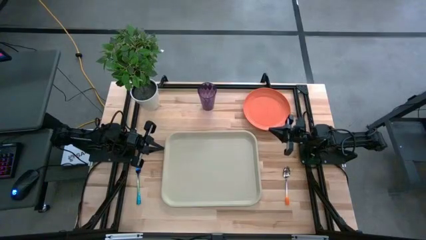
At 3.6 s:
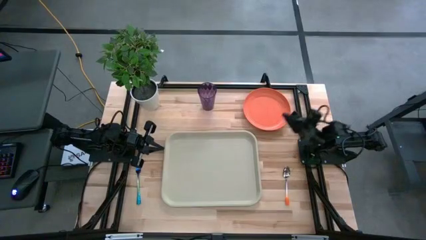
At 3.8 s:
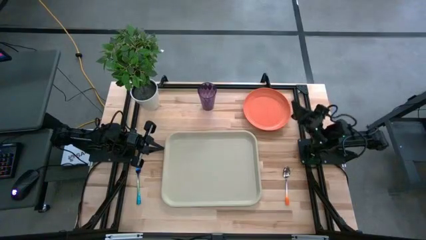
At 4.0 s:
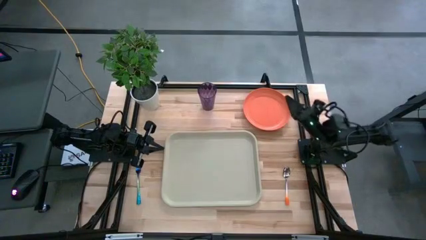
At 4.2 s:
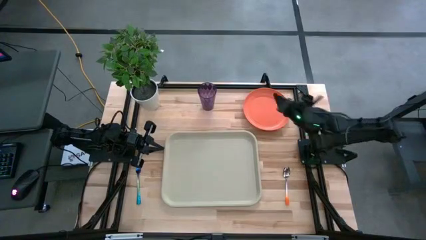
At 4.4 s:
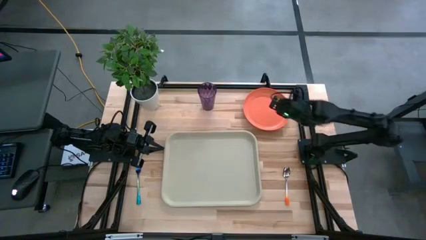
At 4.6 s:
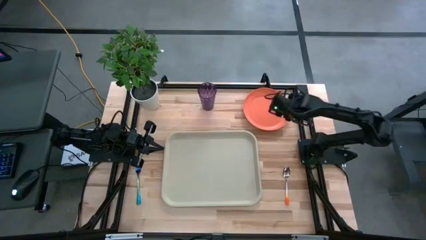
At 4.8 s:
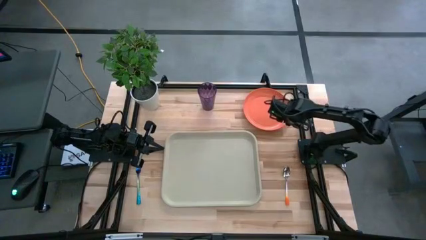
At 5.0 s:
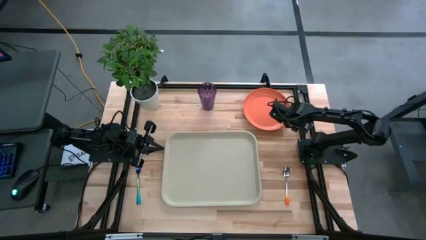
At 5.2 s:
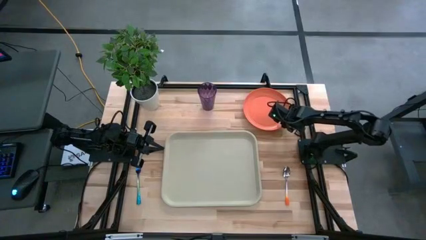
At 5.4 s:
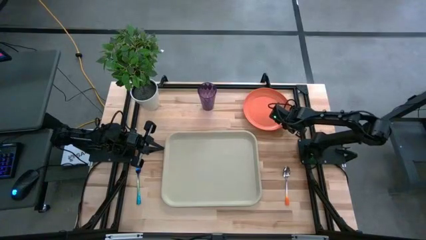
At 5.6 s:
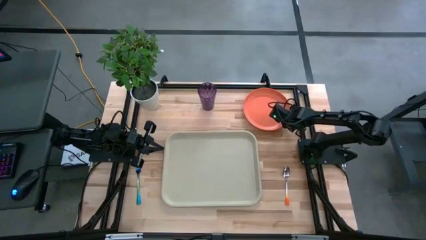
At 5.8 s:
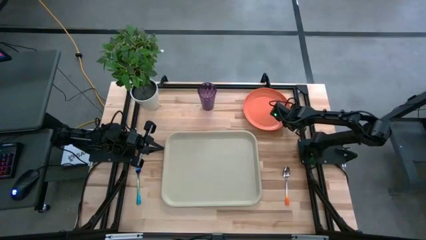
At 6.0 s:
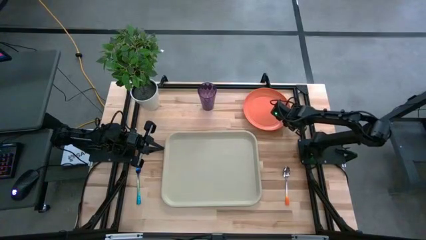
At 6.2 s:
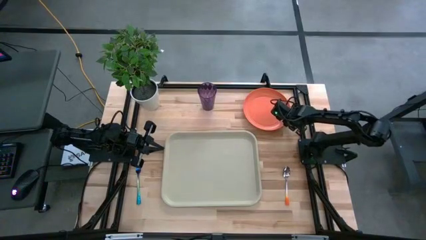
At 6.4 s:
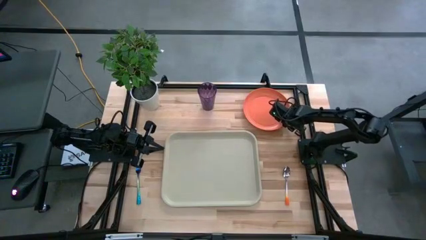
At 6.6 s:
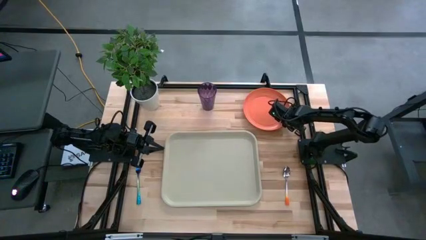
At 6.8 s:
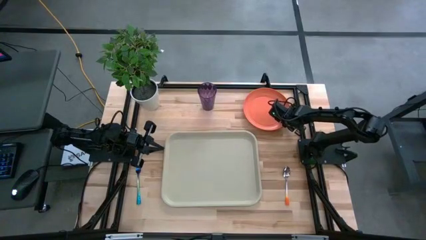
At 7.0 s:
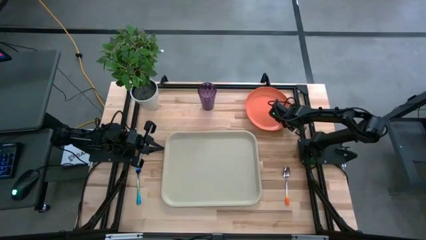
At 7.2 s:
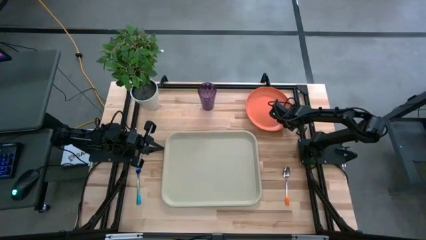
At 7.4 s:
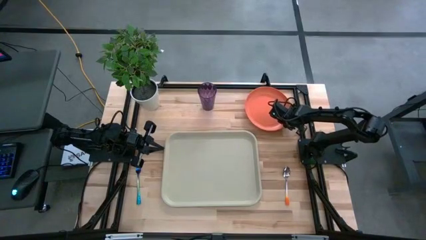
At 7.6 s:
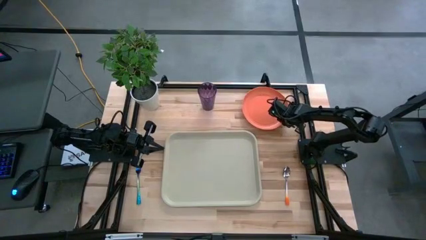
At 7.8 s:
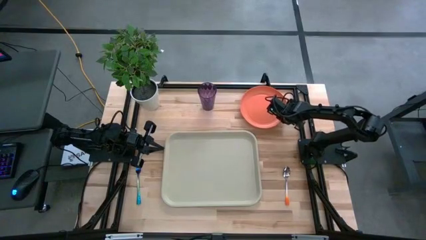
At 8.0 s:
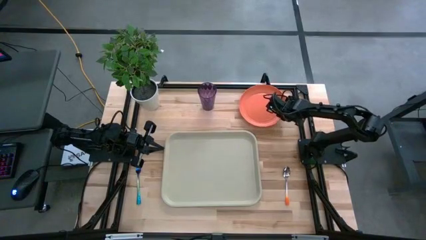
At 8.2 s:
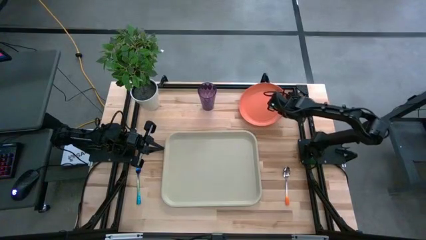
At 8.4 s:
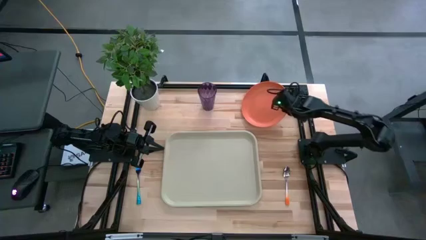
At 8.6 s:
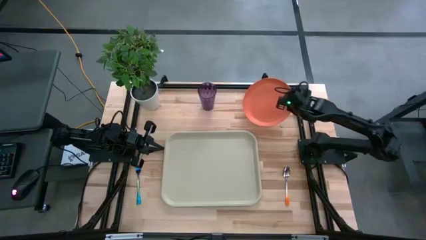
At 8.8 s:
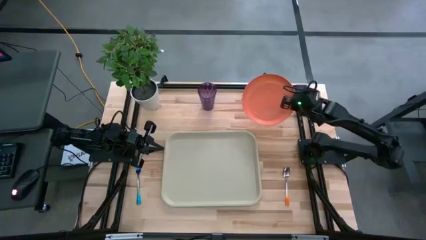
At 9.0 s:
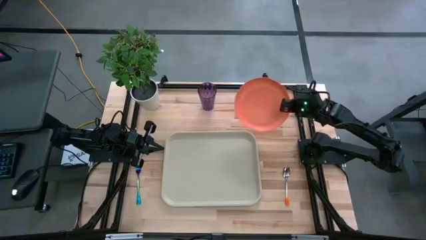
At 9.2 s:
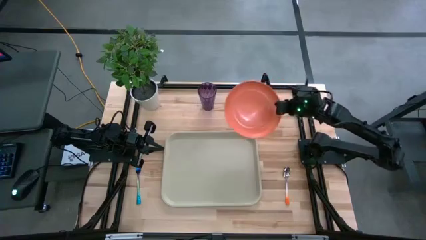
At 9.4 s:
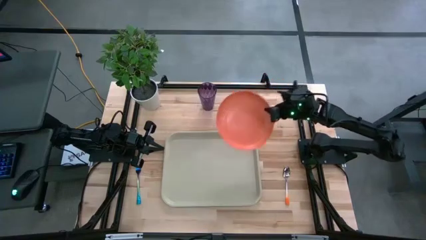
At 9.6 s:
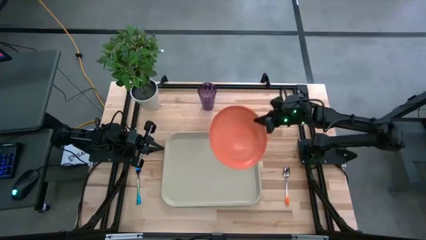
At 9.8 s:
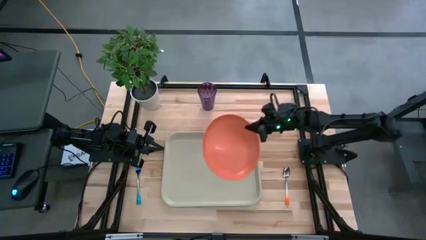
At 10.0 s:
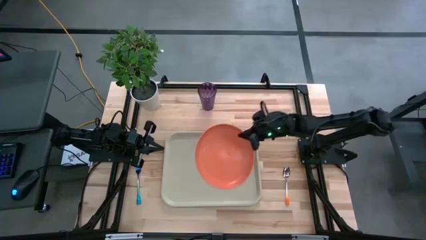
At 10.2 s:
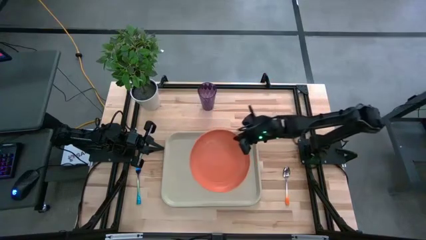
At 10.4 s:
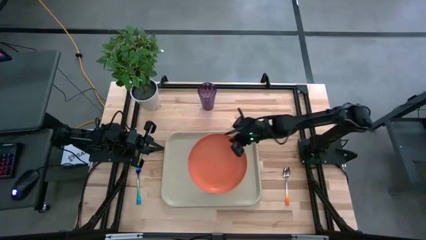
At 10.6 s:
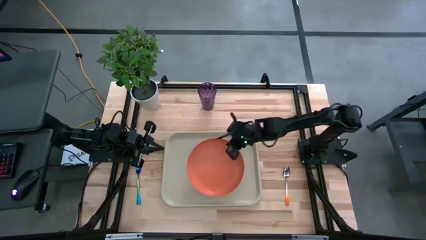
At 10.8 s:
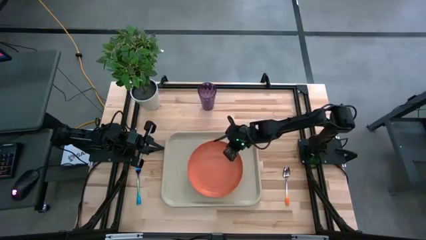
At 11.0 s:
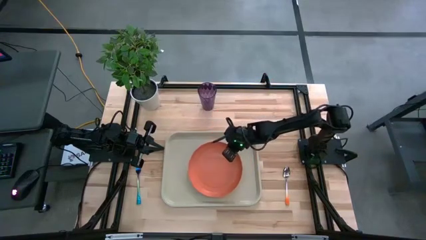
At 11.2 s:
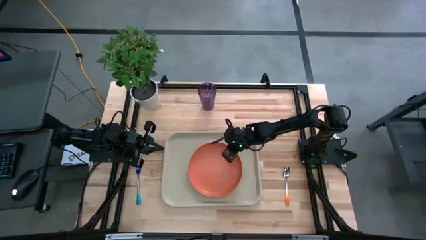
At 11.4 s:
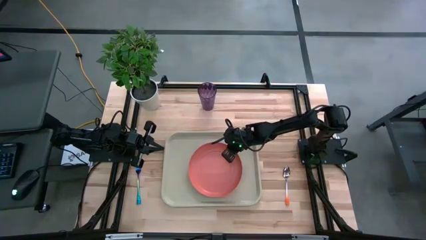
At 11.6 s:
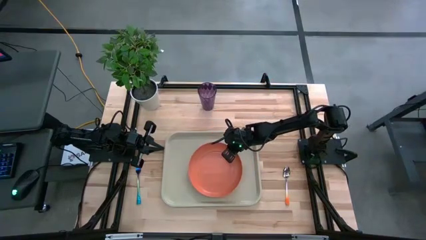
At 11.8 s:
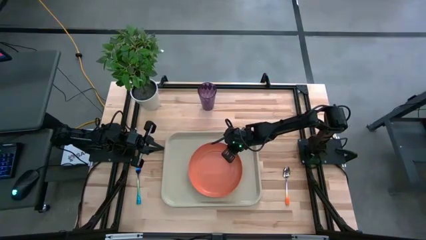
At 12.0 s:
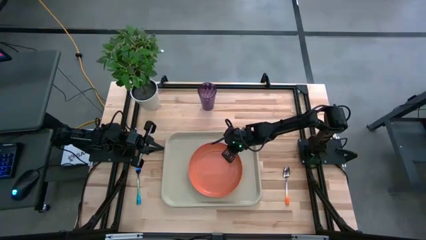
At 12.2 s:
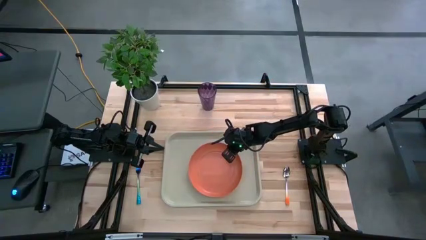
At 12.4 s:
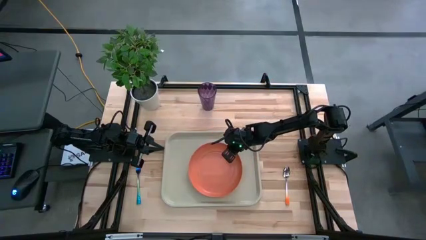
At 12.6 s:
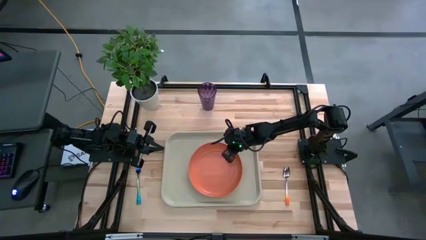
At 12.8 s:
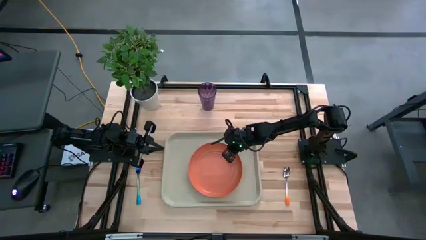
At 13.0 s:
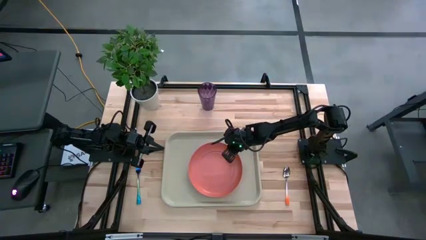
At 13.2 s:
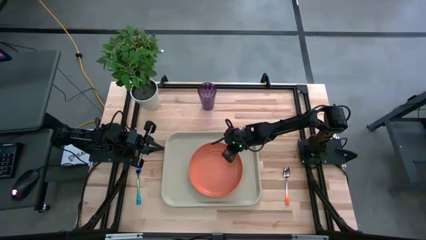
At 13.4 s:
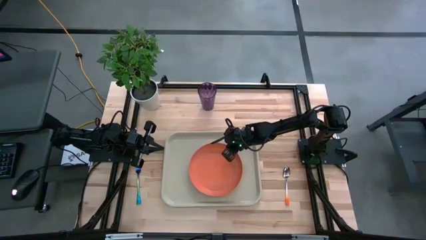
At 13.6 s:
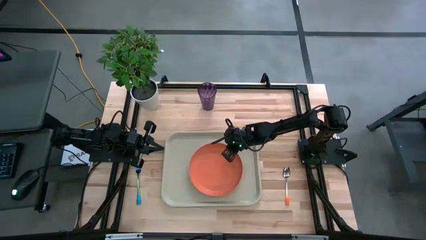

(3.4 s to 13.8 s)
Task: Pick and place plate/cup/fork/spoon on tray
Put the orange plate on the gray tray
